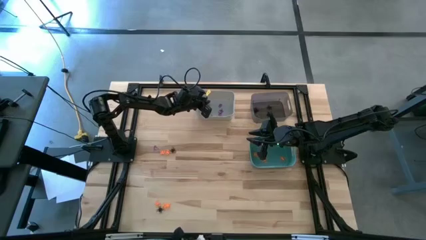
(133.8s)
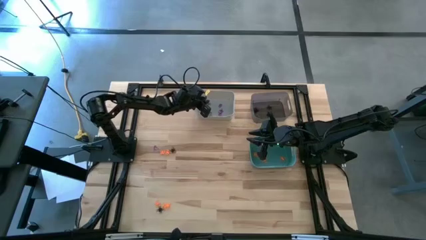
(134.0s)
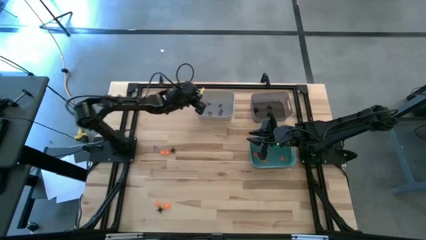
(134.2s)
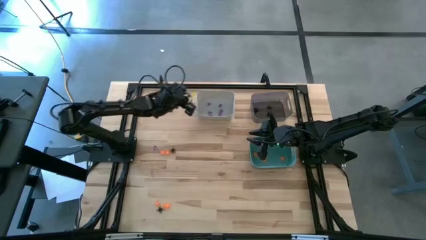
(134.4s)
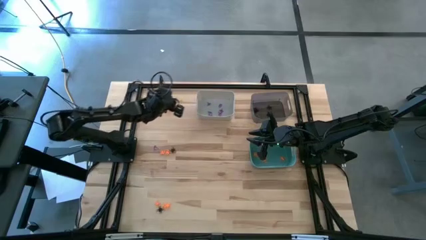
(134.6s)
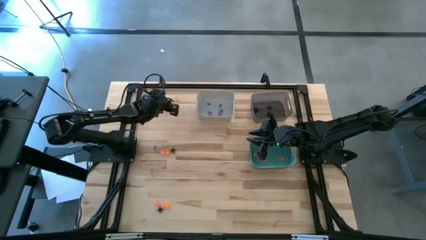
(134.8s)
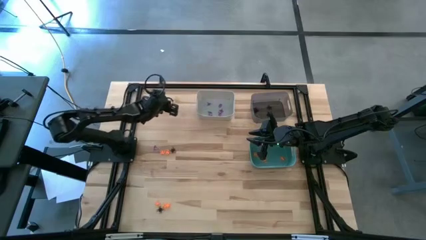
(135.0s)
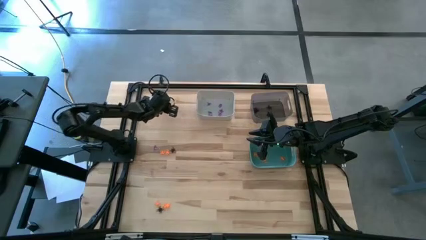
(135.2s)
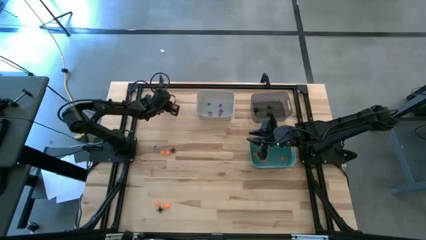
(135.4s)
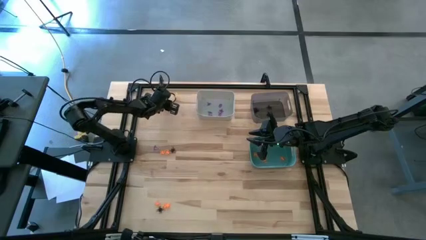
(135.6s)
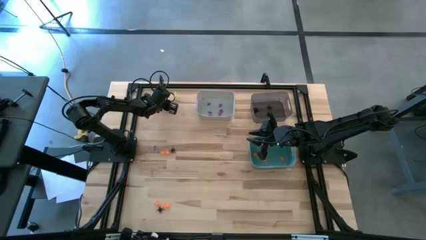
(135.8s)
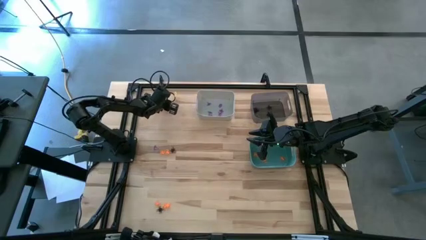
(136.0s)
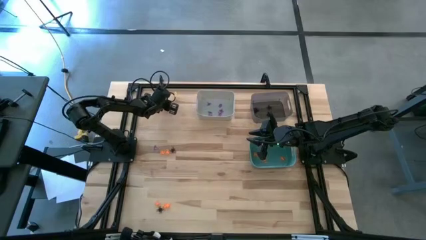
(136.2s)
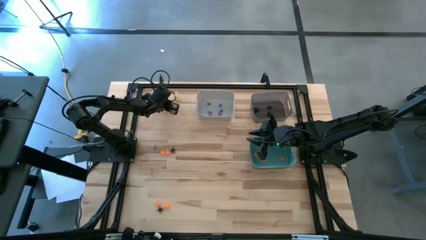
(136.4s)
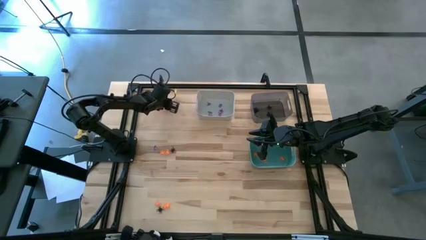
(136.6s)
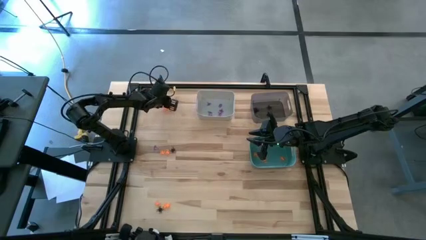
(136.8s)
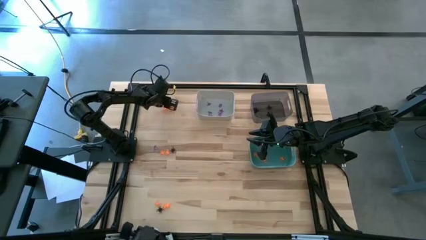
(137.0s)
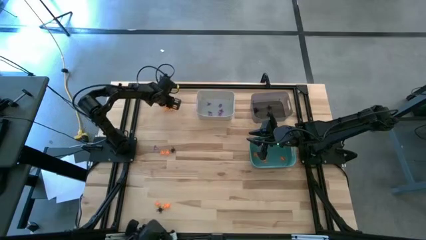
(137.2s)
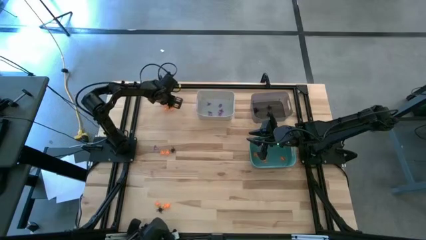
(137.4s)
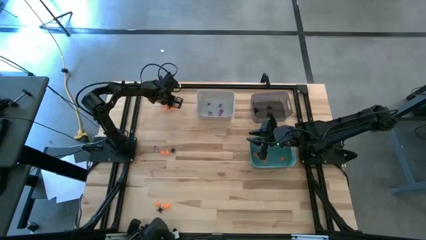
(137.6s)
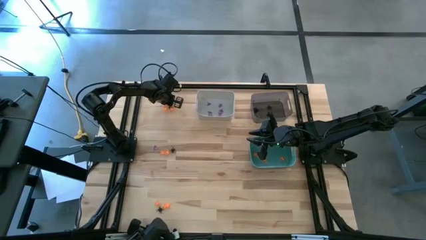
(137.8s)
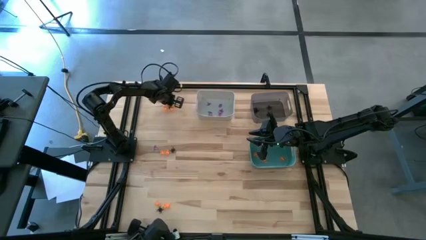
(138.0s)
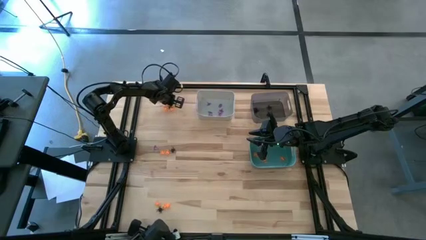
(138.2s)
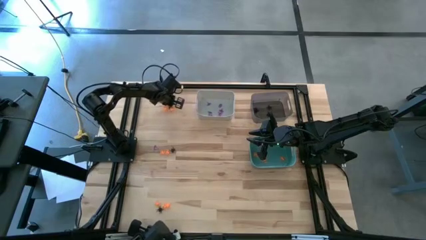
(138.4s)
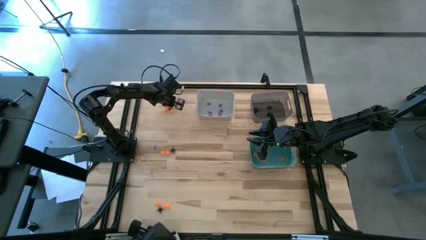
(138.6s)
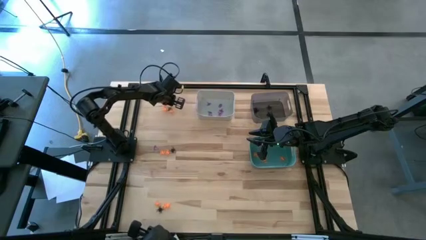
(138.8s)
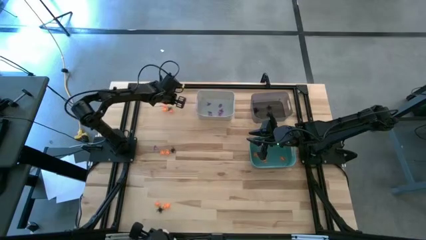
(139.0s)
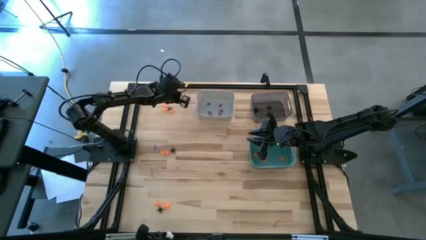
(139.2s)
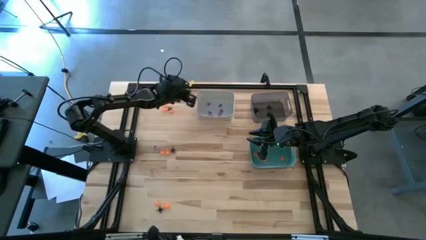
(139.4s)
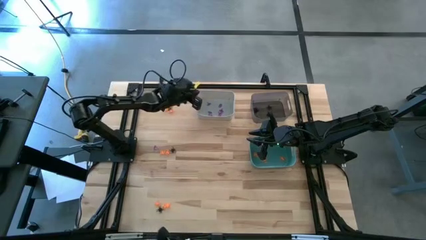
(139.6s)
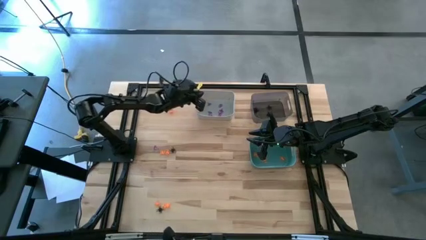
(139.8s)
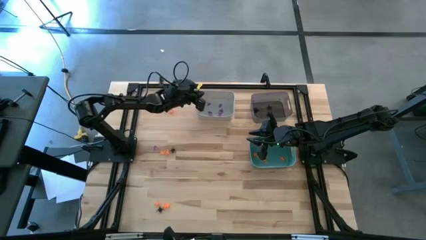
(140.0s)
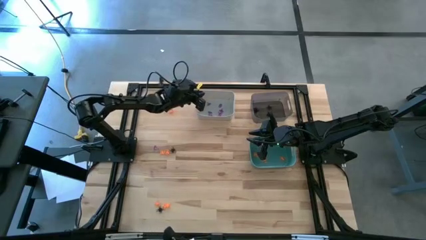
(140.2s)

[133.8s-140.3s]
Task: Sort Halloween decoration
Put the purple witch hat toy into the white bin

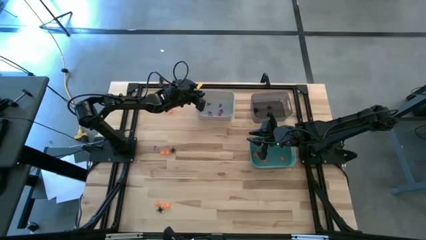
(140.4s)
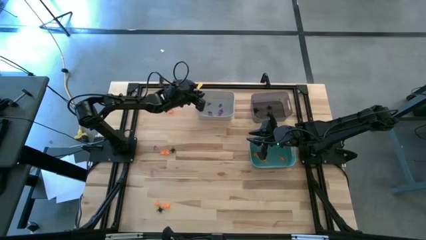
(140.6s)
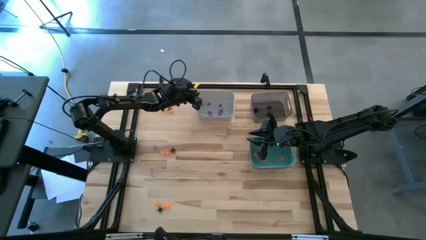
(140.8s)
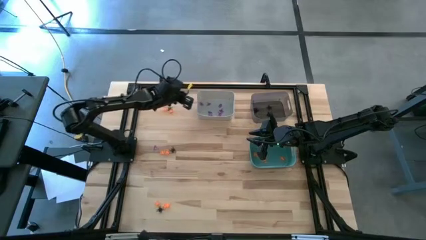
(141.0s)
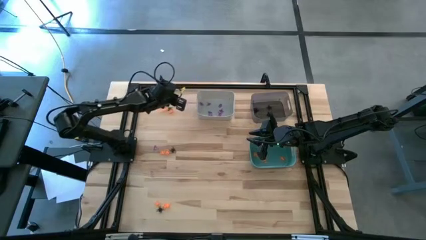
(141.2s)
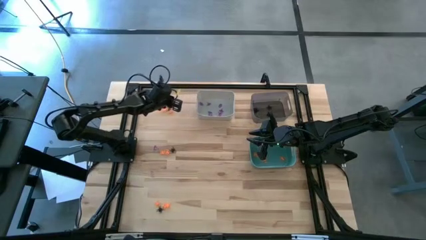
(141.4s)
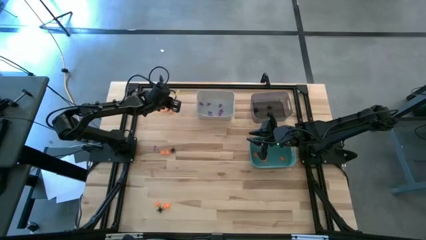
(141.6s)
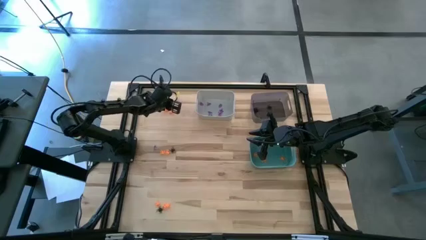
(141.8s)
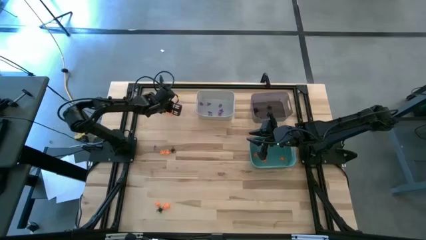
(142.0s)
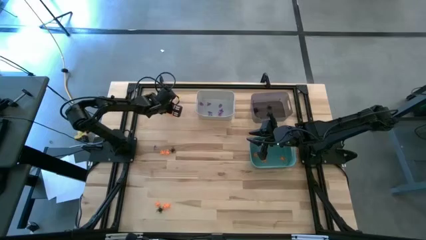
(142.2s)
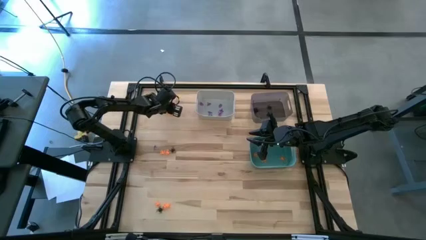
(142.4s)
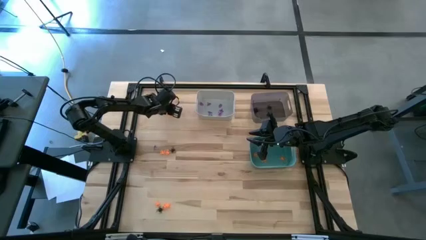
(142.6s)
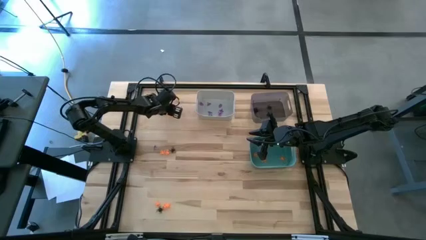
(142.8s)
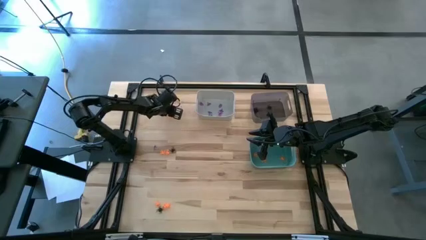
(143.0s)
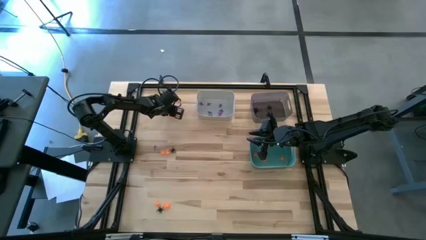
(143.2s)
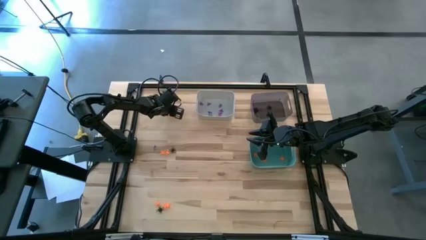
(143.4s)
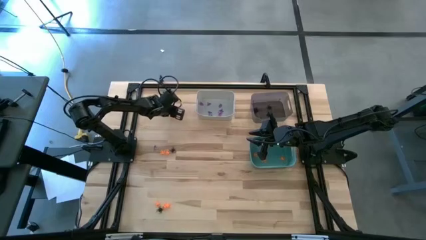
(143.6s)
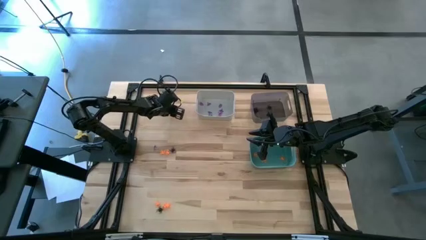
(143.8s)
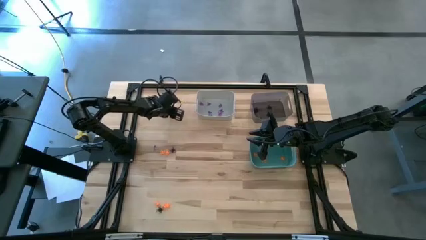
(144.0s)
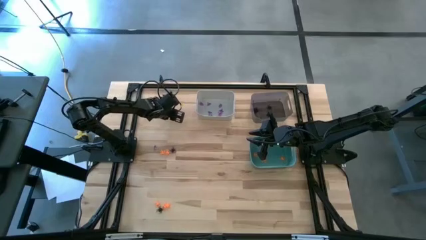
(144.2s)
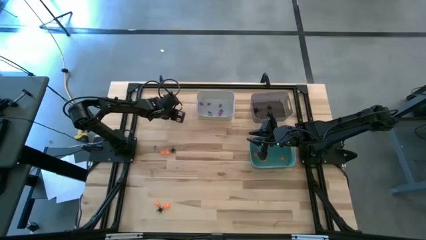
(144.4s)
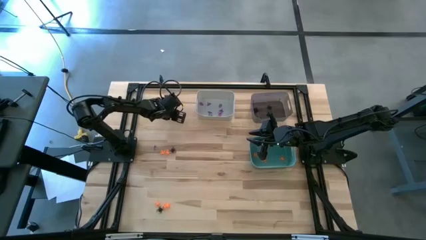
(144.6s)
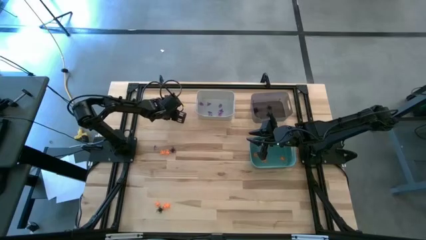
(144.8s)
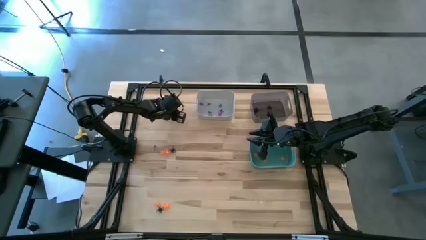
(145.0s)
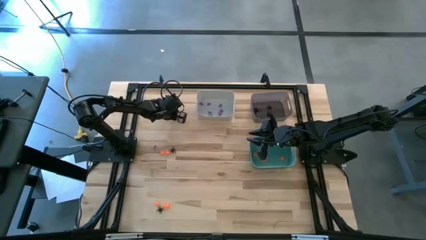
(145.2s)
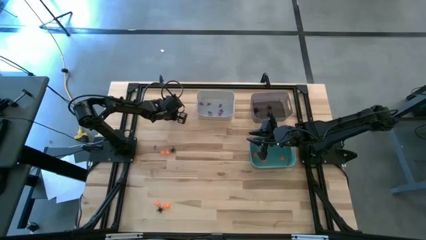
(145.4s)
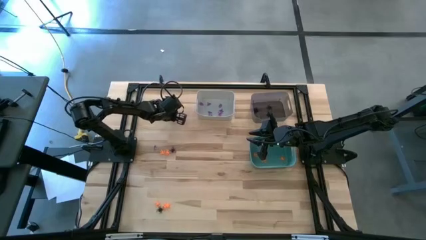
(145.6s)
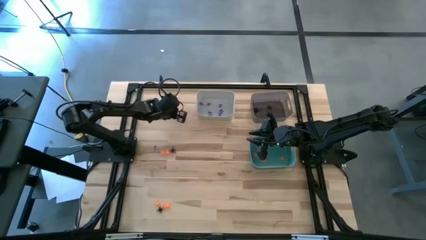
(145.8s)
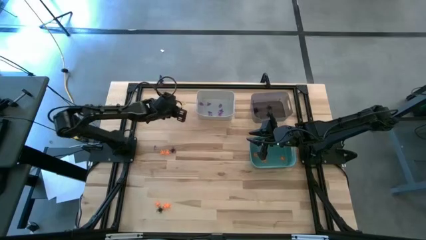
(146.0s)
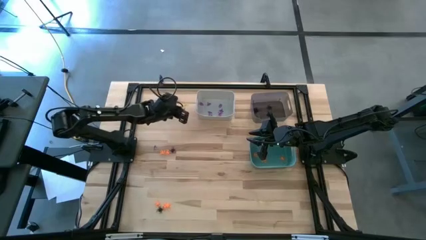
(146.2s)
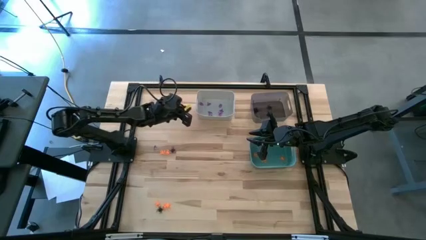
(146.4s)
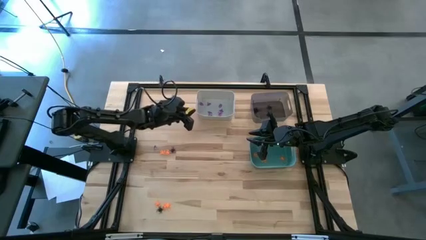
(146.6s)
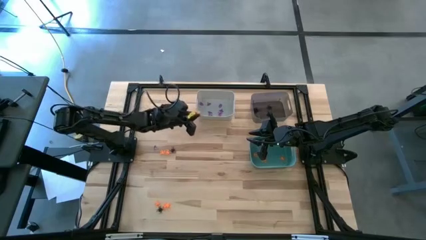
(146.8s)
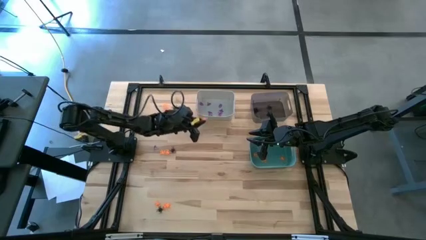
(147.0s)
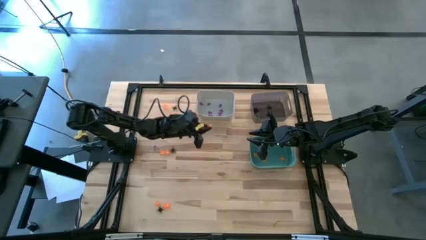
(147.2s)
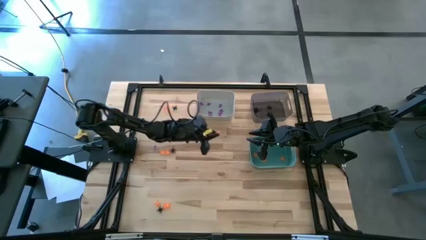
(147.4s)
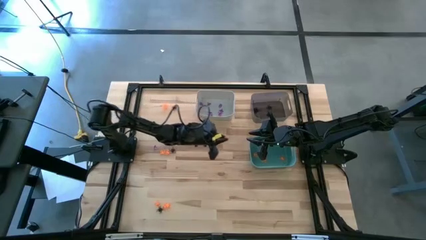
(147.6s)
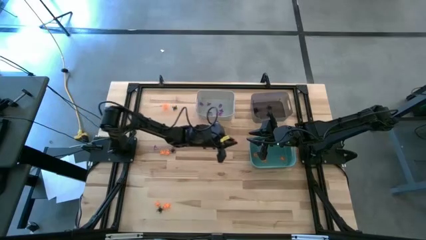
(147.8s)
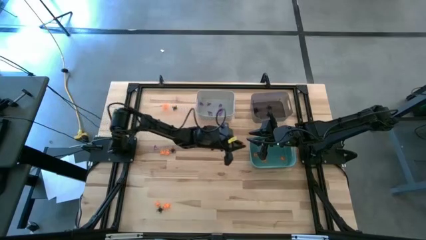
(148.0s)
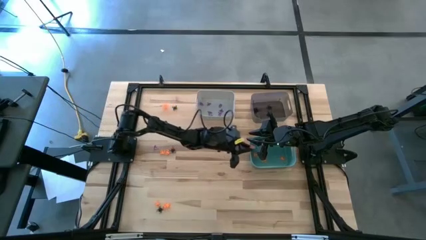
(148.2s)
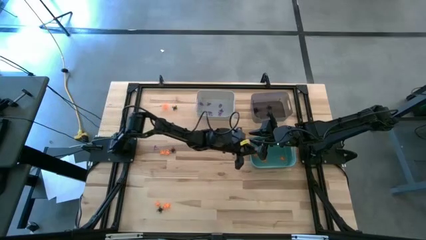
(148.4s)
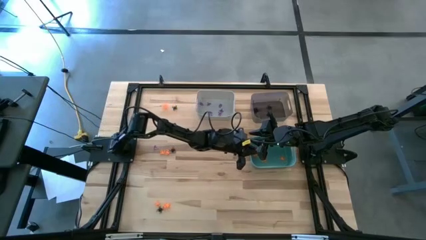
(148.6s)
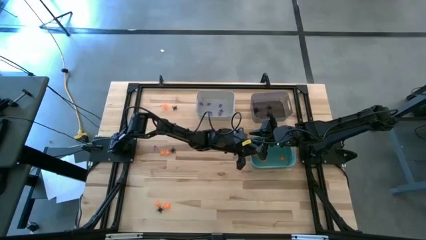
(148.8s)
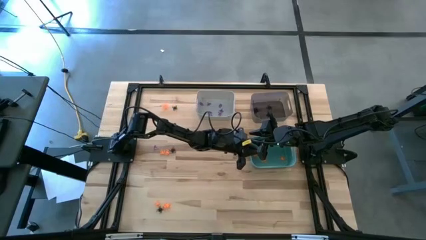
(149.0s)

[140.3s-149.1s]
Put the orange spider toy into the green bin
